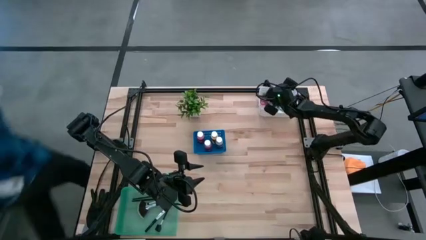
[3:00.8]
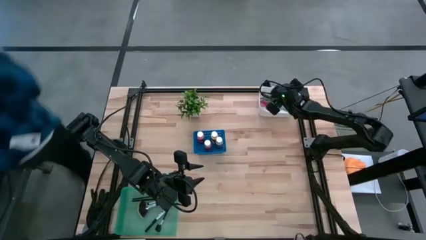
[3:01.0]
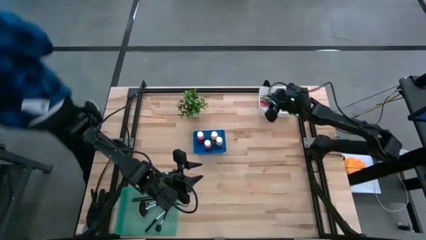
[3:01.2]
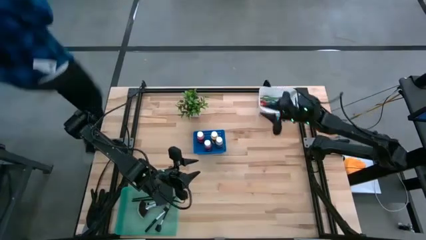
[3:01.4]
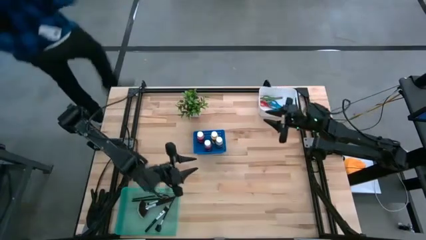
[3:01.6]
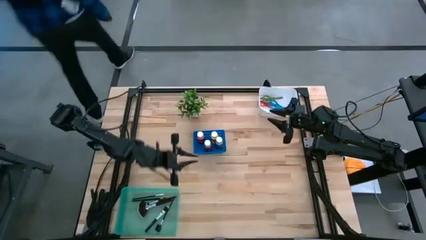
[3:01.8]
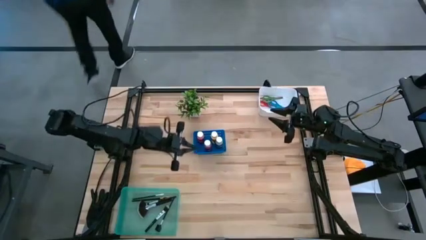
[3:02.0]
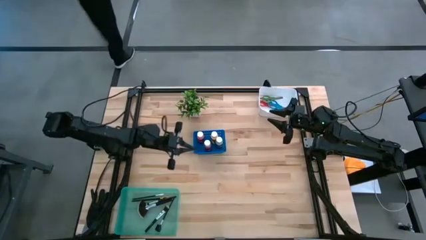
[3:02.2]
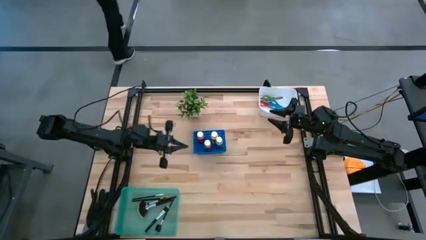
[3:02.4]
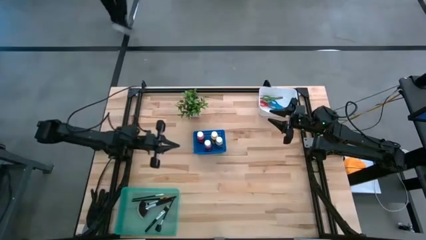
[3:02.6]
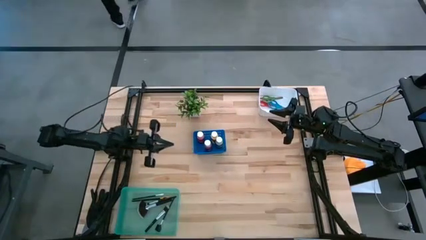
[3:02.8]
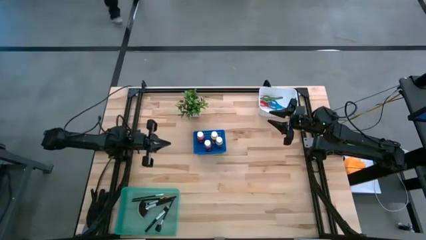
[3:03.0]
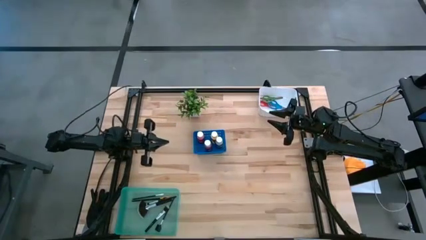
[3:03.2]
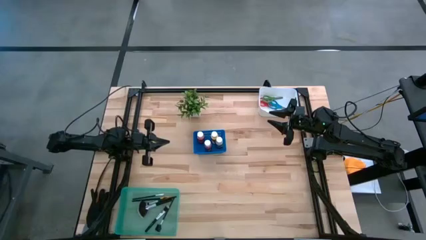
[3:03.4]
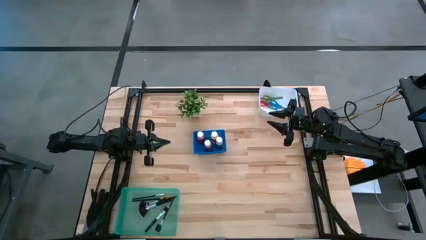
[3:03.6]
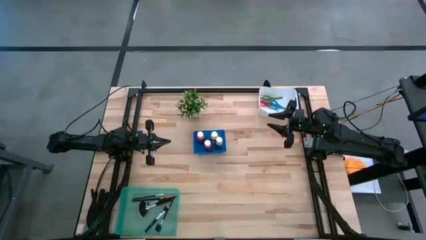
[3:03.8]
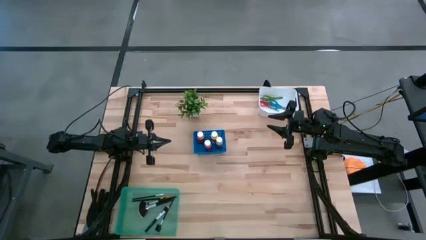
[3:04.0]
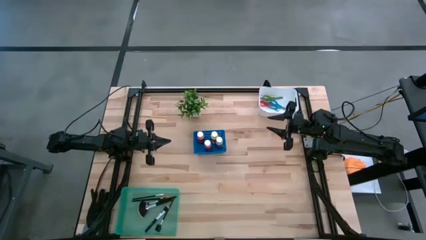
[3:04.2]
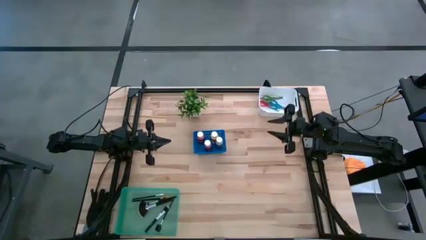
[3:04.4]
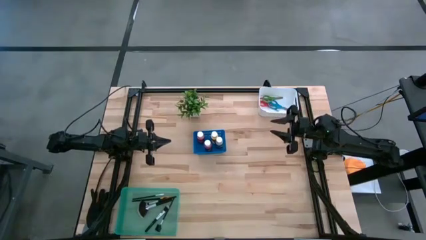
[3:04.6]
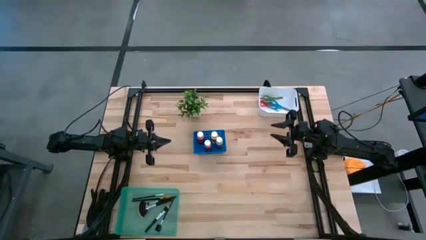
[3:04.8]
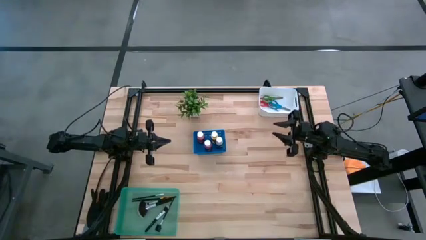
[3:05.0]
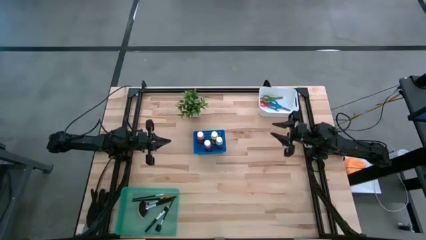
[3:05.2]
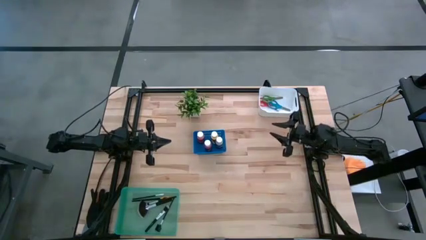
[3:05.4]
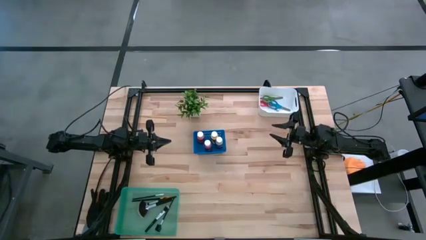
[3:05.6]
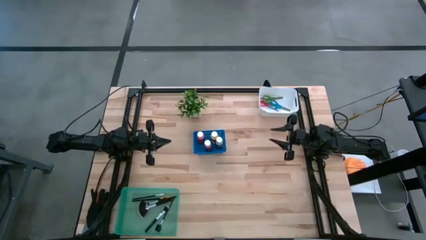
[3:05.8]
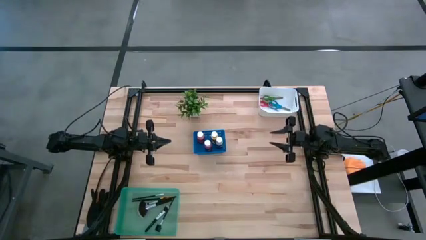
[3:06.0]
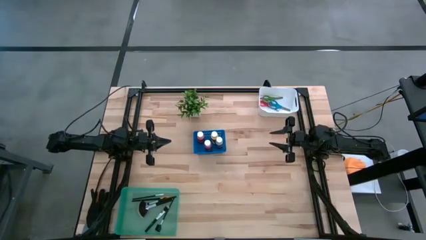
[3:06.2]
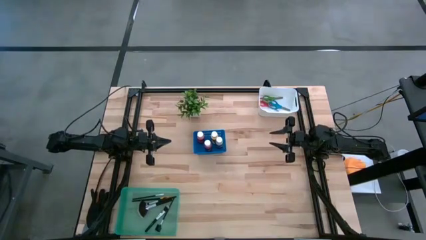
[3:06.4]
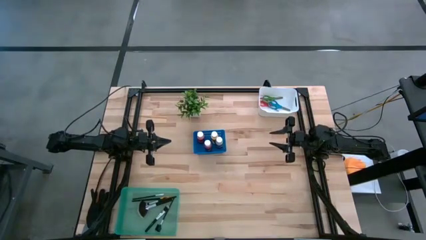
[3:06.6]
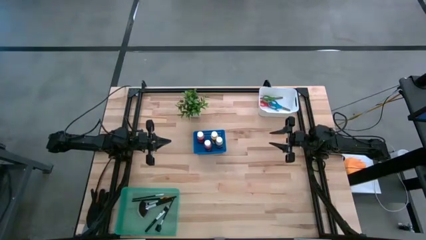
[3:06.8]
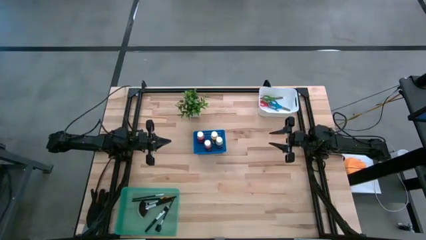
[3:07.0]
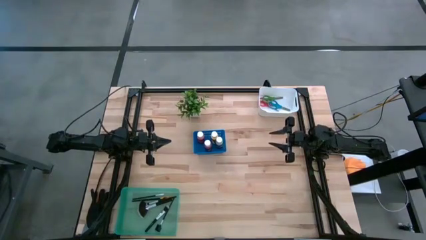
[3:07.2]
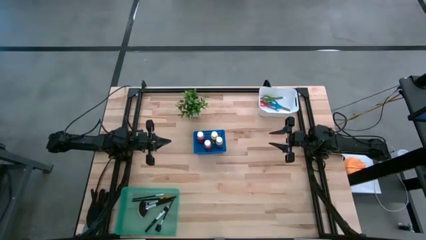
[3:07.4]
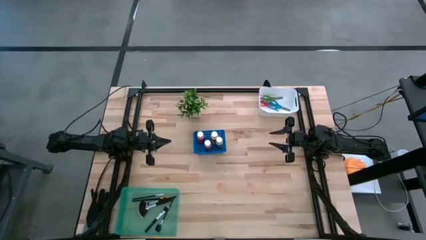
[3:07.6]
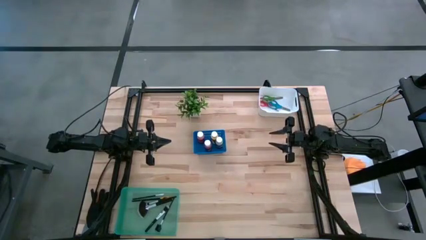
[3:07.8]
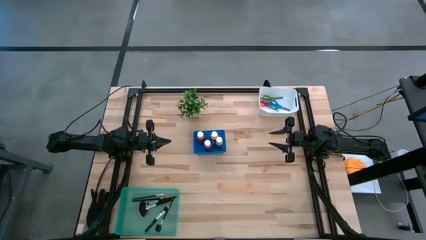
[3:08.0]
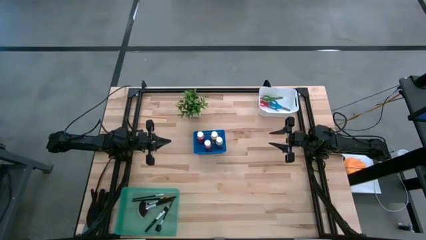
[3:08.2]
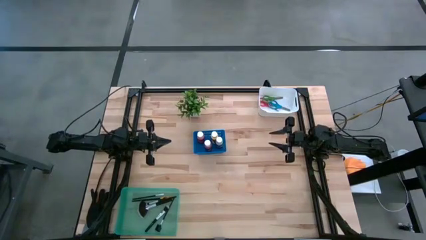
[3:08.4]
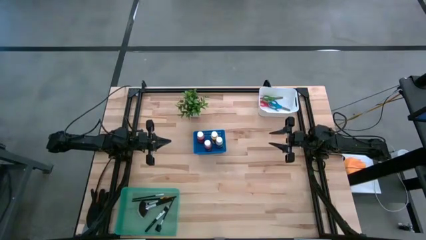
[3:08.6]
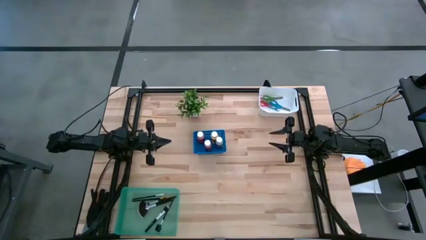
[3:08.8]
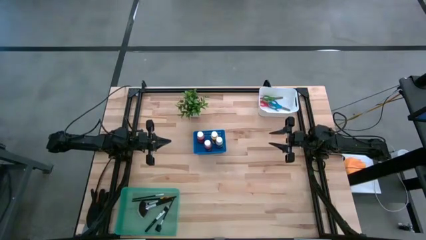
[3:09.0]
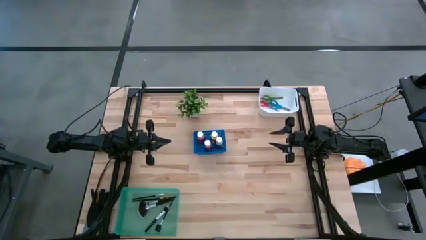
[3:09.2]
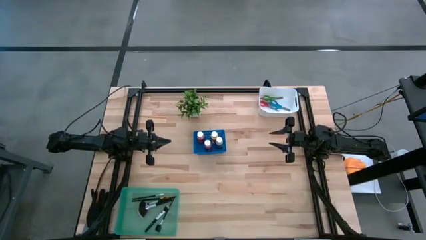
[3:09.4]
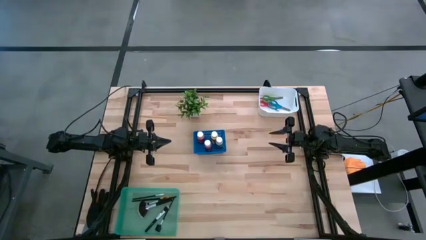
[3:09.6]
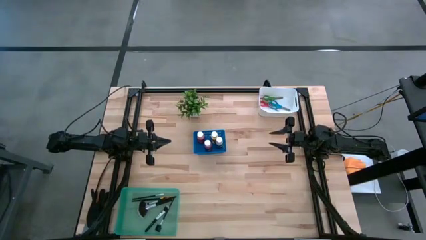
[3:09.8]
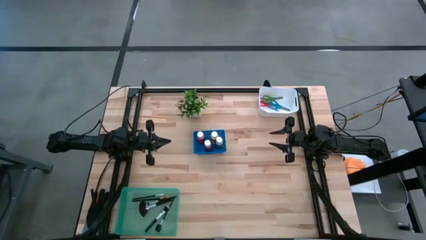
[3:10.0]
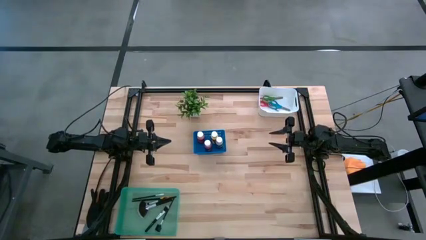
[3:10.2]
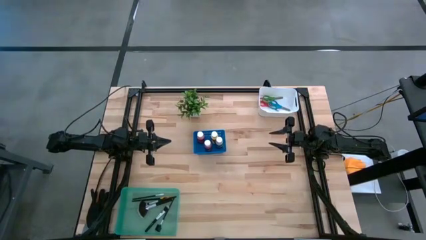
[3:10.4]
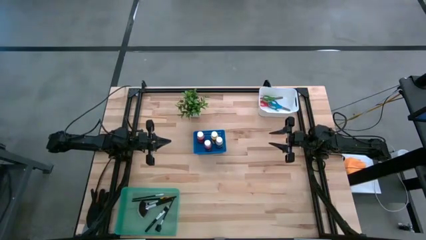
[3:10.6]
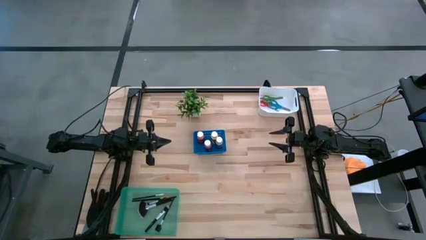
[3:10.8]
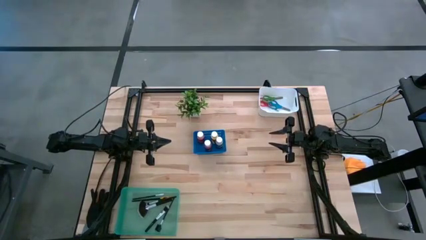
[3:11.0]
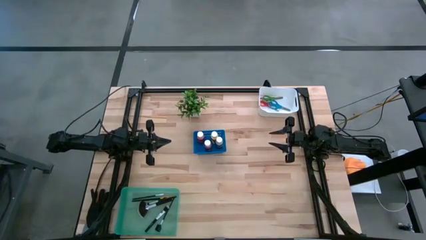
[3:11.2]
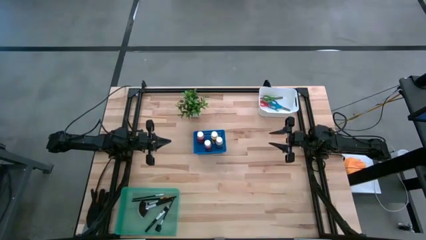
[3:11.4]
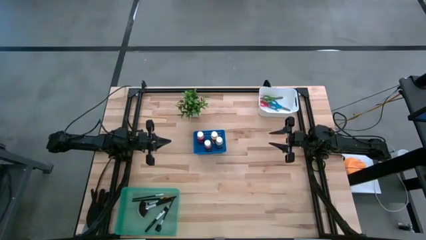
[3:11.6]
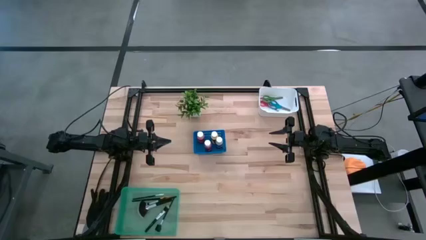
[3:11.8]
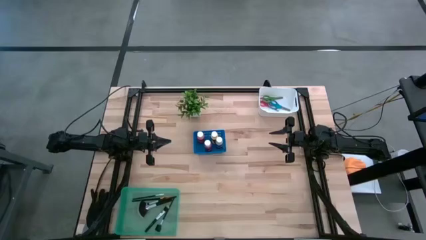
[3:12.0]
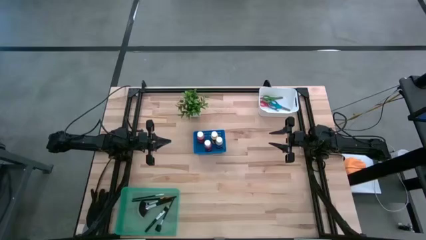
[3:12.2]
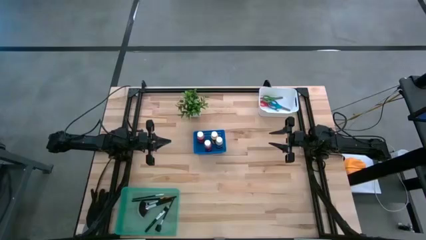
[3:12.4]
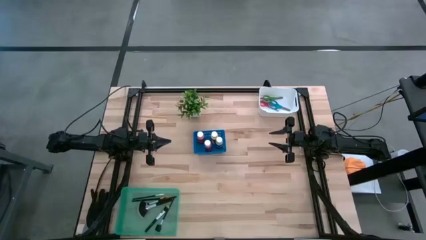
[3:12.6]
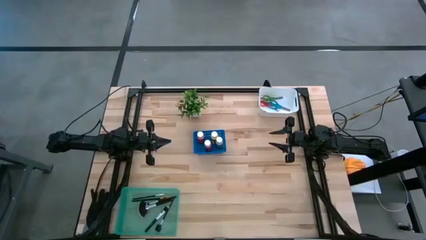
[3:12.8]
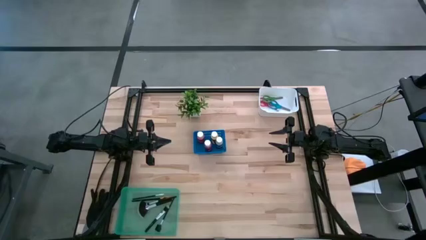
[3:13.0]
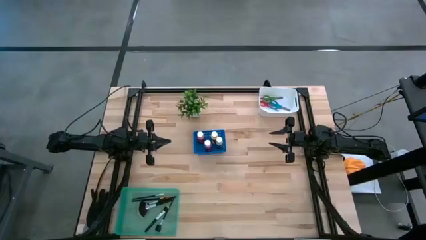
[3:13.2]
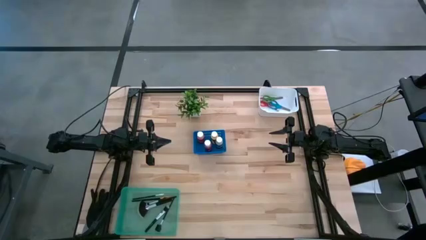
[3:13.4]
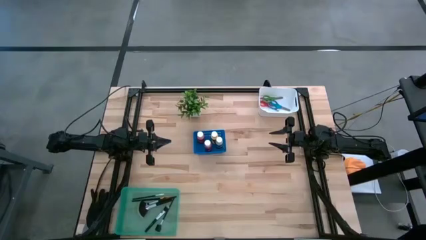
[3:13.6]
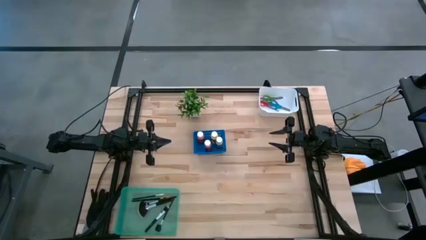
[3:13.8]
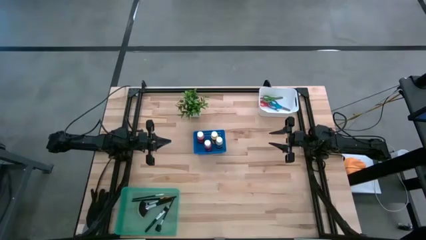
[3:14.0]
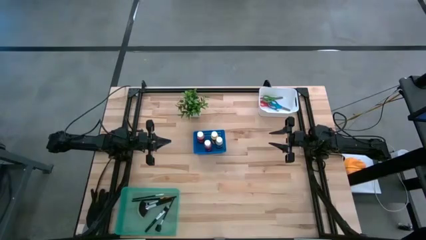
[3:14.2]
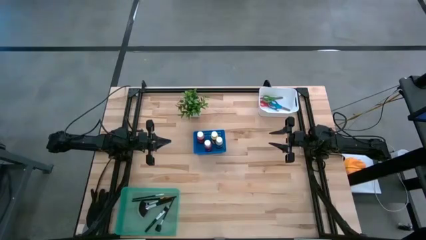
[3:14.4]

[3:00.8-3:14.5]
Task: Pick & Place Paint Supplies
Return to Home Position
